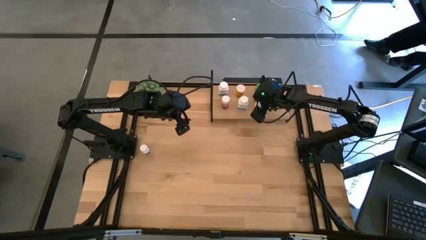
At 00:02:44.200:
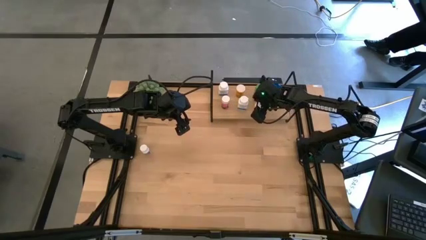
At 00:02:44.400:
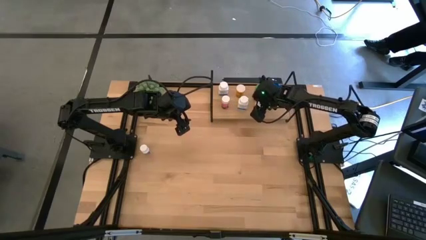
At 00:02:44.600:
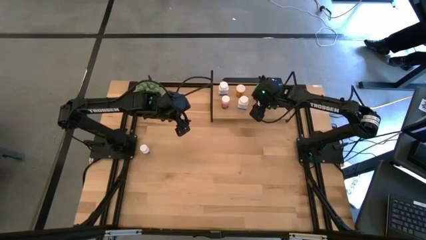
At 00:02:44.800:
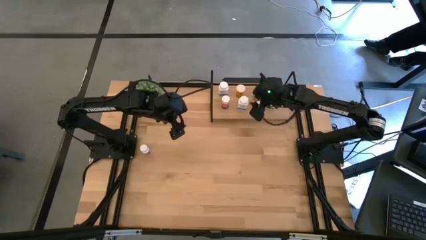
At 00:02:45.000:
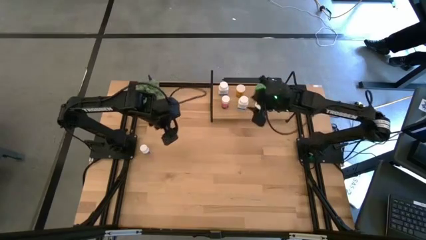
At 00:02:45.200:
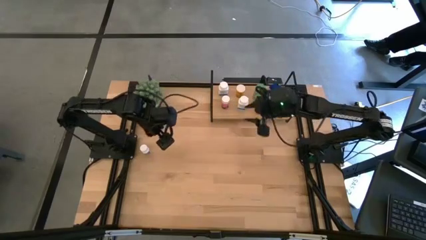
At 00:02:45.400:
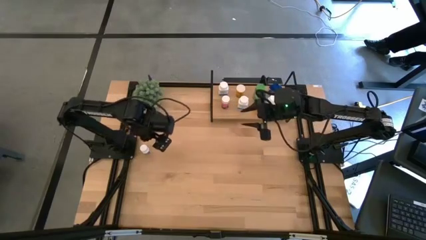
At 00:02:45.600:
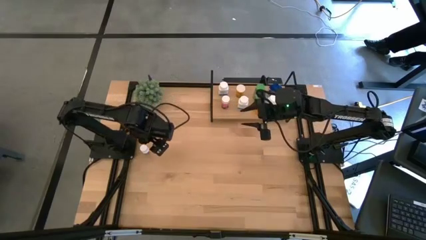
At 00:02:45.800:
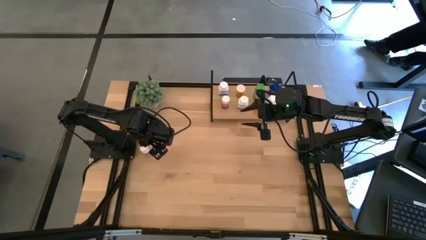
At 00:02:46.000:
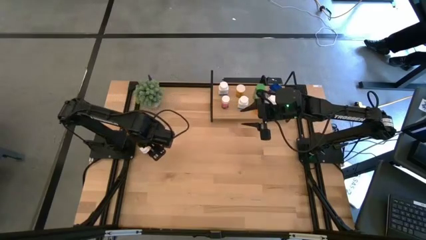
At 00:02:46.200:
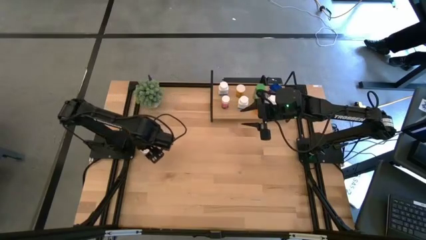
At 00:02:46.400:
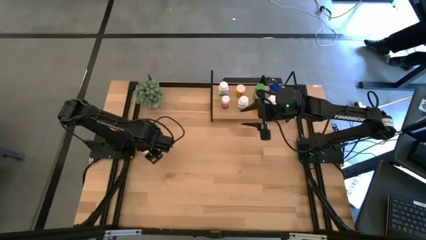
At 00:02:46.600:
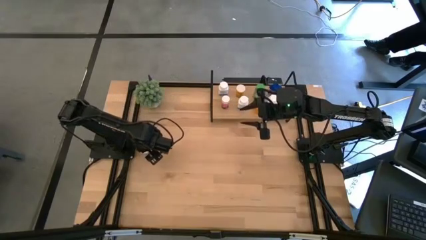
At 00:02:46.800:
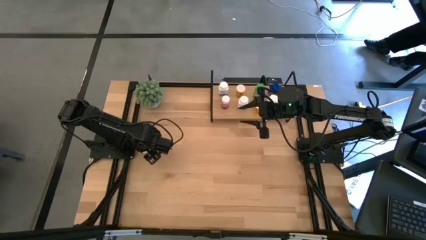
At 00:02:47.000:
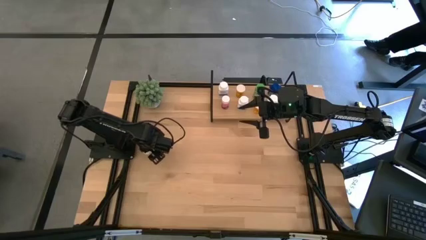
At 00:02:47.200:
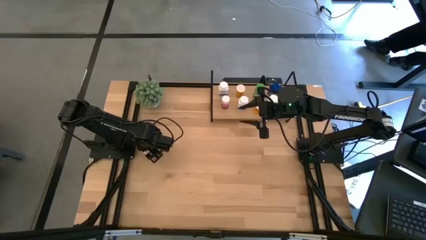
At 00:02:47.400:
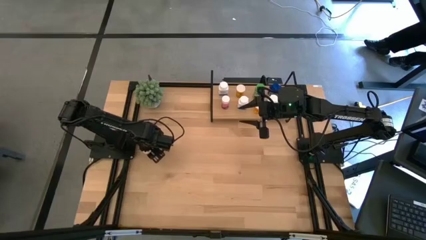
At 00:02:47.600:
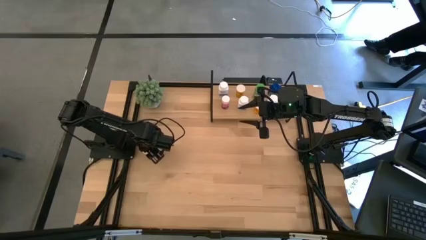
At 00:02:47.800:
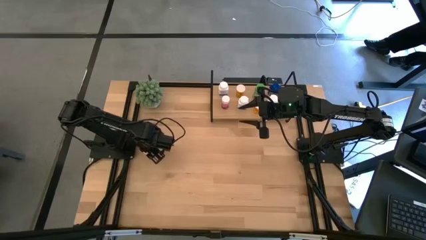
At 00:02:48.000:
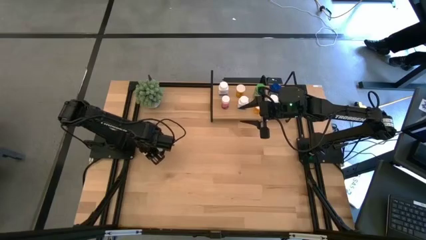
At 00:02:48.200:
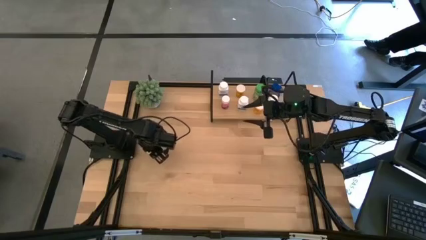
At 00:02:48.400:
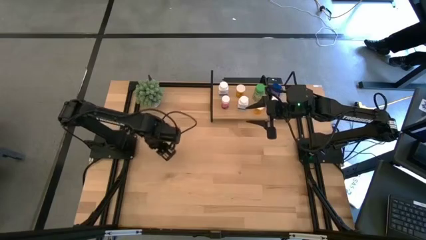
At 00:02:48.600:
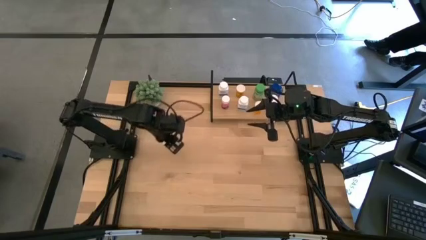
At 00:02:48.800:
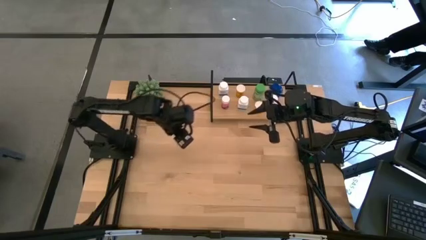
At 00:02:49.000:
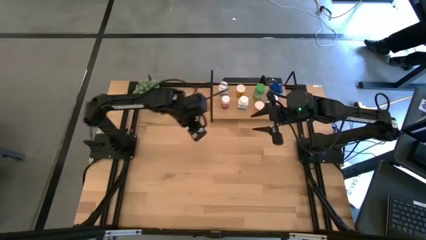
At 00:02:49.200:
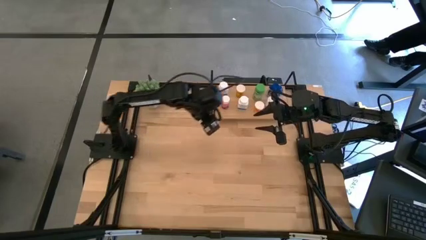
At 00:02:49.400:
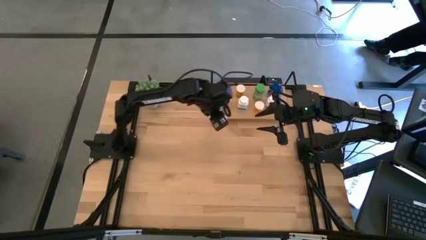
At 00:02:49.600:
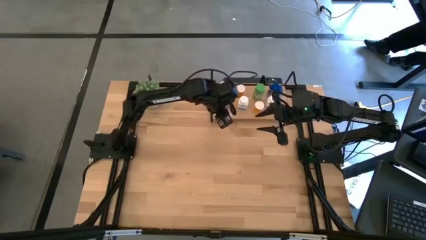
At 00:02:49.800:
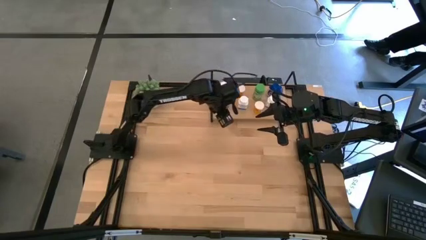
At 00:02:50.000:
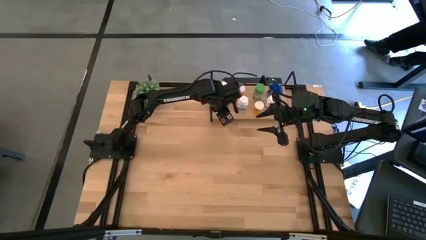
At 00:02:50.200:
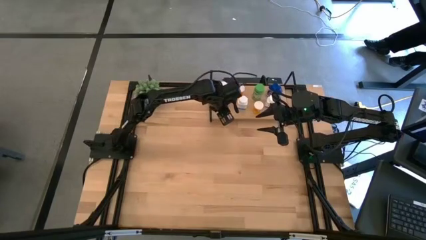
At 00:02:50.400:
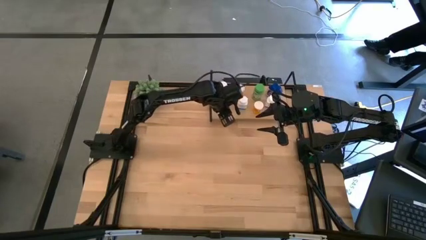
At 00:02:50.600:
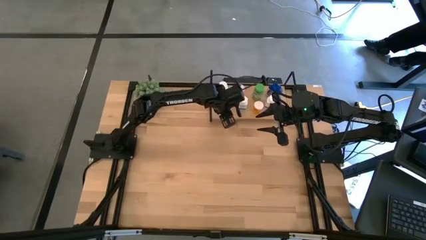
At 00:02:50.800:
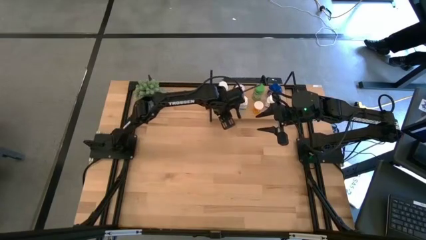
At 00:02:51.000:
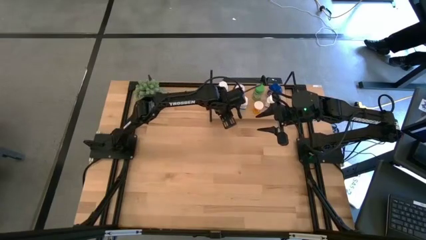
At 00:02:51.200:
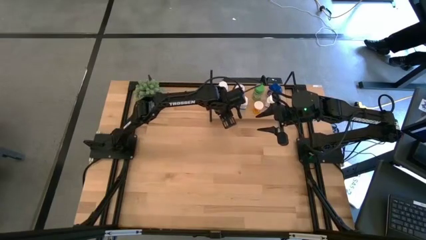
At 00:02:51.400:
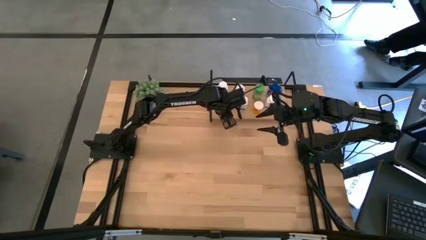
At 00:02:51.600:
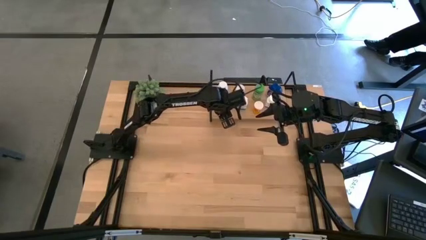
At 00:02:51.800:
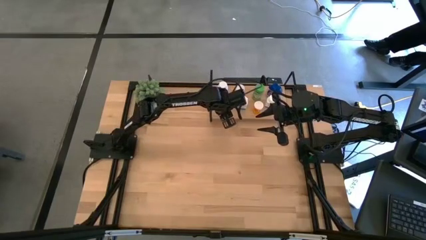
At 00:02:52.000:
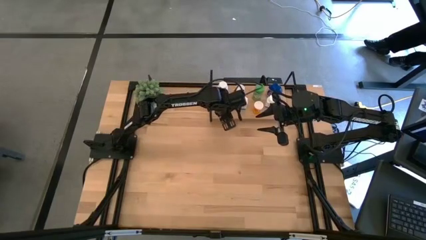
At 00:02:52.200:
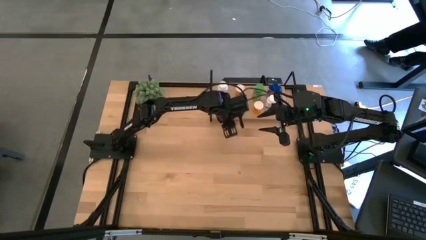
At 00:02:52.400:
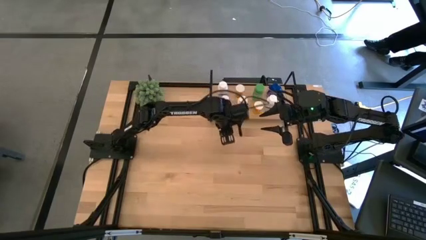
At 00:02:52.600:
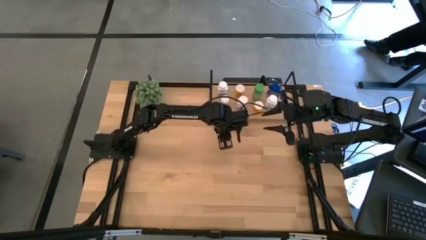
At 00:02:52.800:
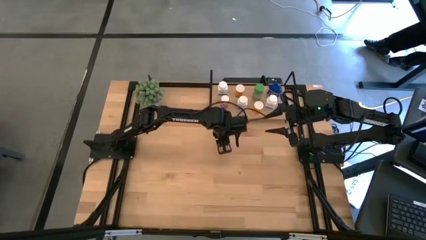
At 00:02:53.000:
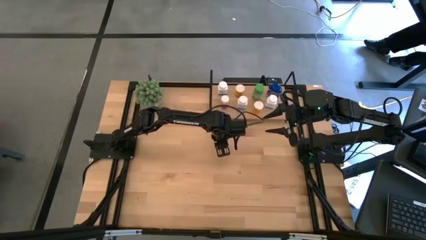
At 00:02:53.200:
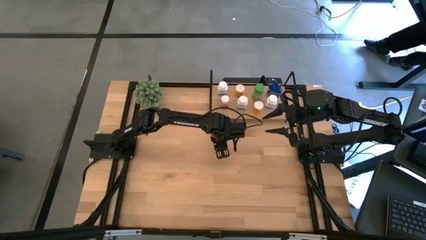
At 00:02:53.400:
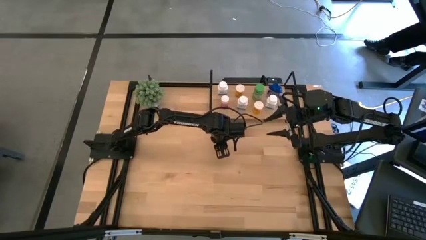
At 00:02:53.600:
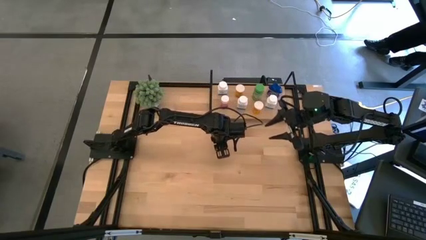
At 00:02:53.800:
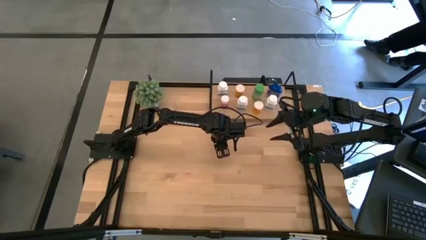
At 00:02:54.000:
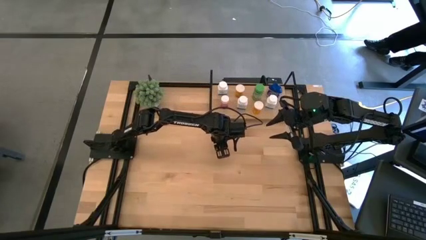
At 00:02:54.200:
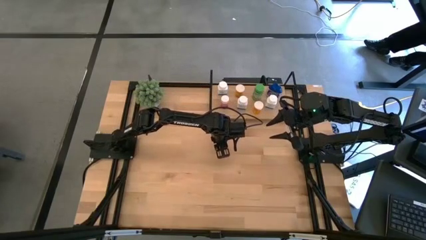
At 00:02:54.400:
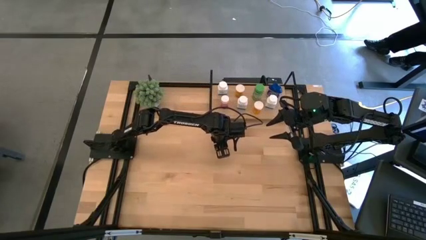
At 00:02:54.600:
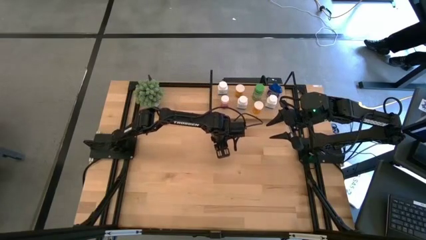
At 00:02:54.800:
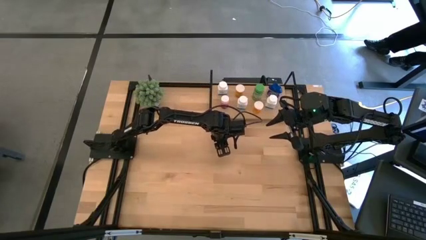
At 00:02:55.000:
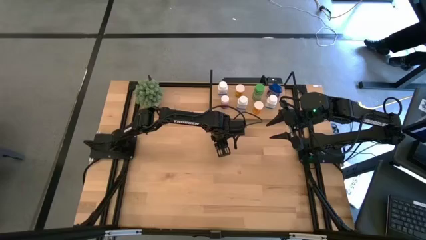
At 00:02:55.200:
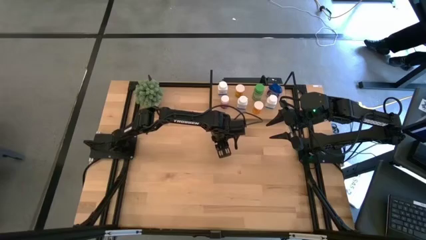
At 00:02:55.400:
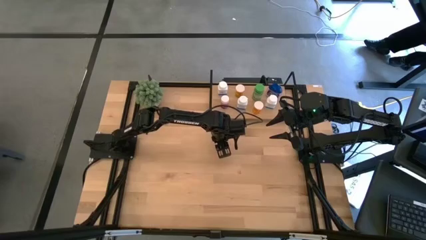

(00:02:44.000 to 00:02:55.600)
Task: Pick and place medicine bottles onto shelf by color
Put the white medicine bottle on the shelf
